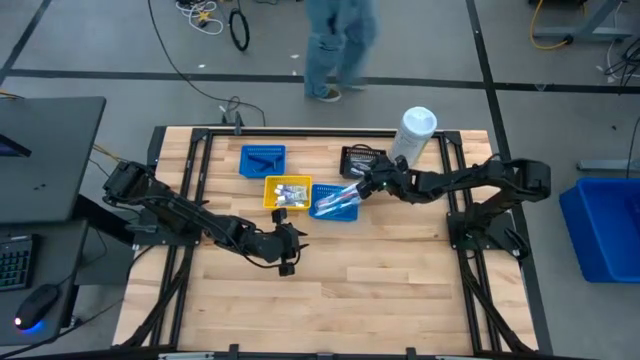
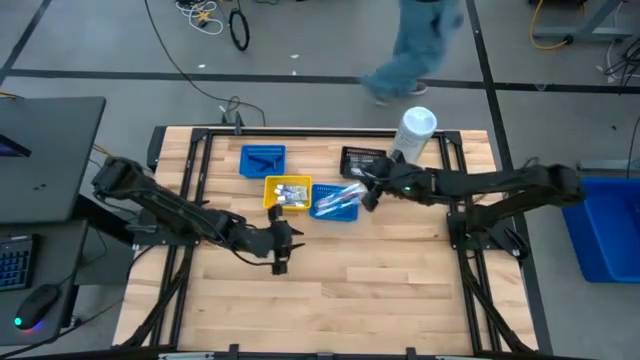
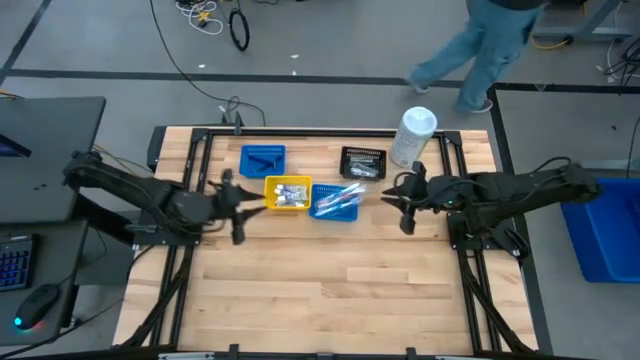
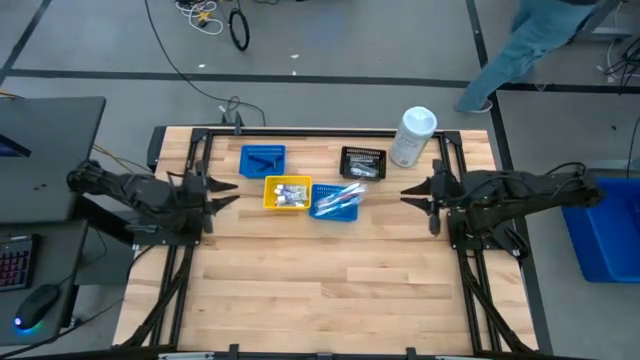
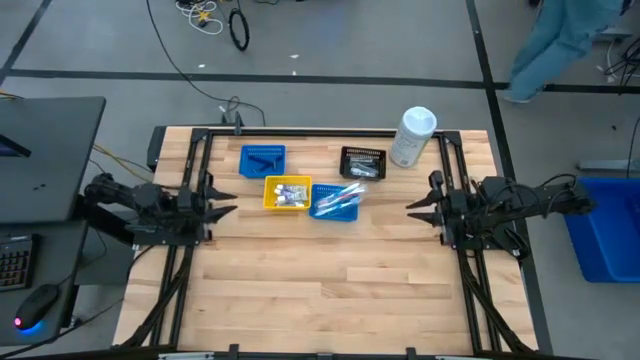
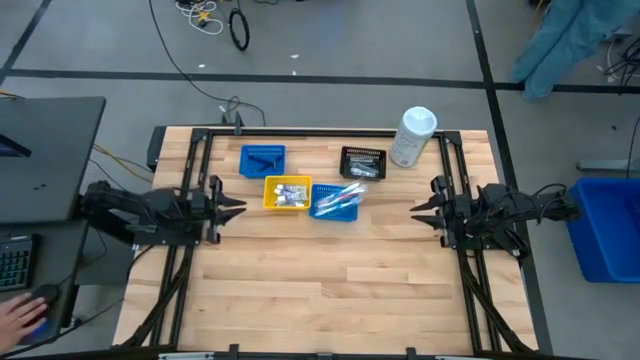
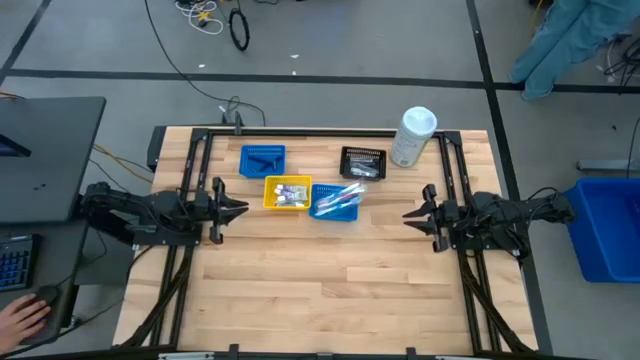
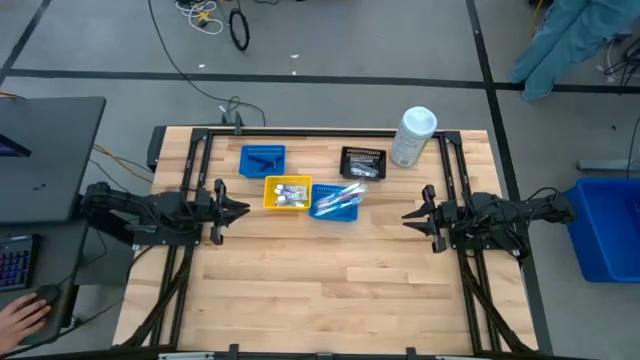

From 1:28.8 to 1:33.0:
Task: Pick & Place Travel size toiletries
Return to Home Position

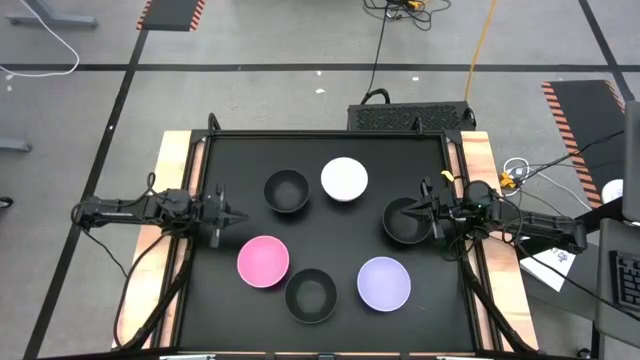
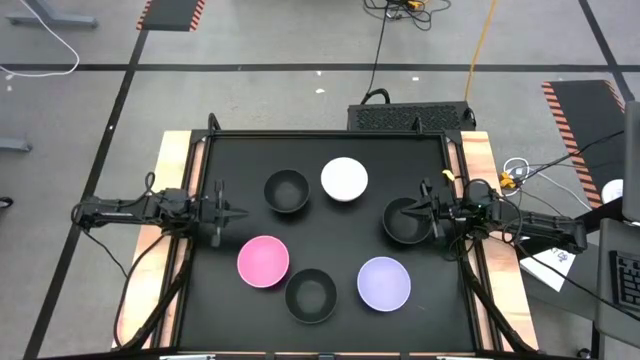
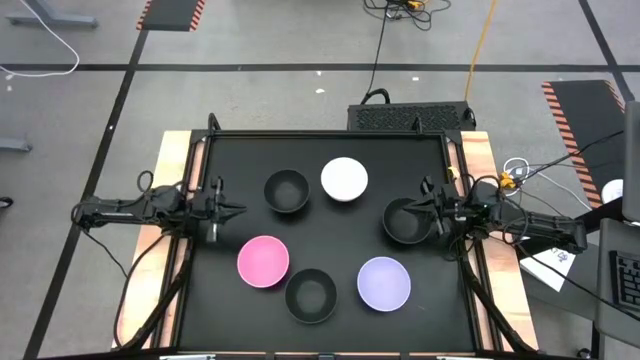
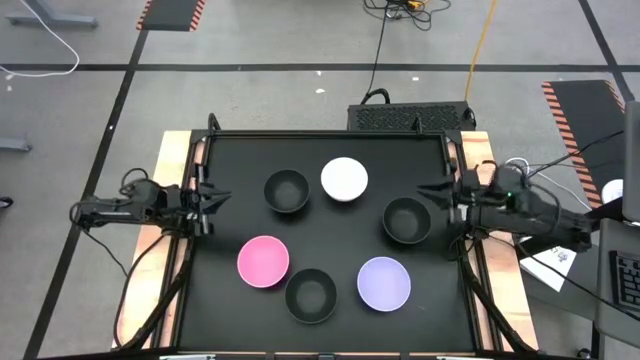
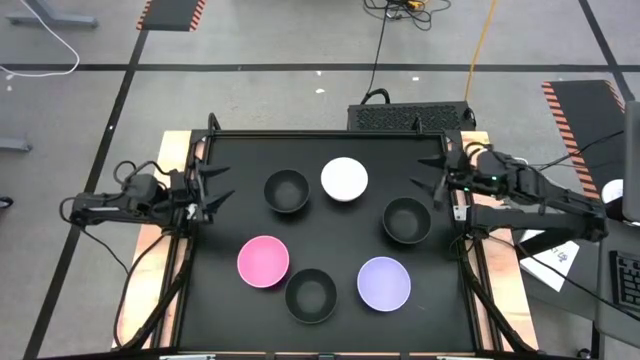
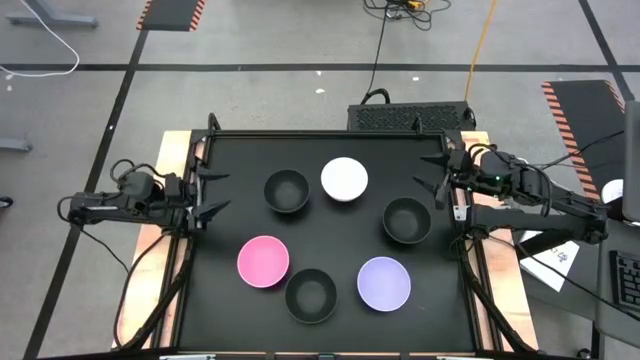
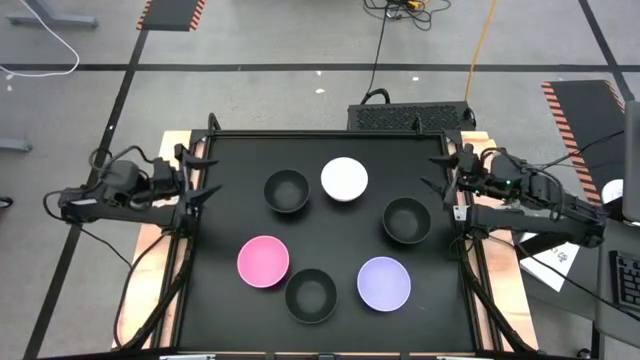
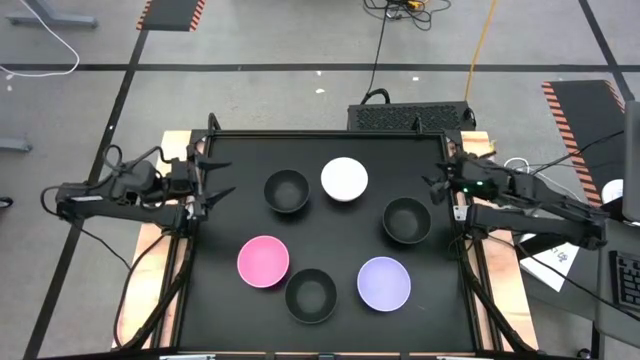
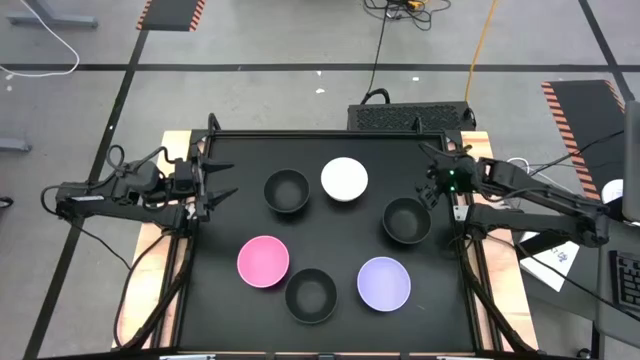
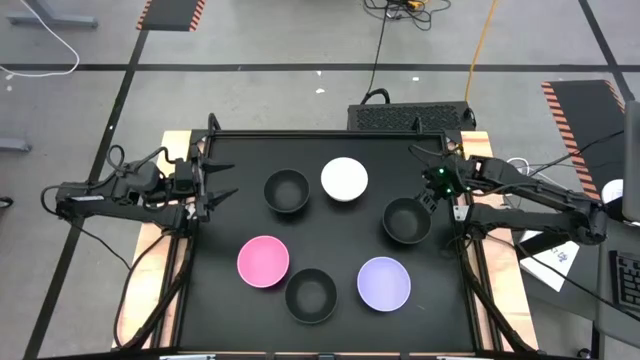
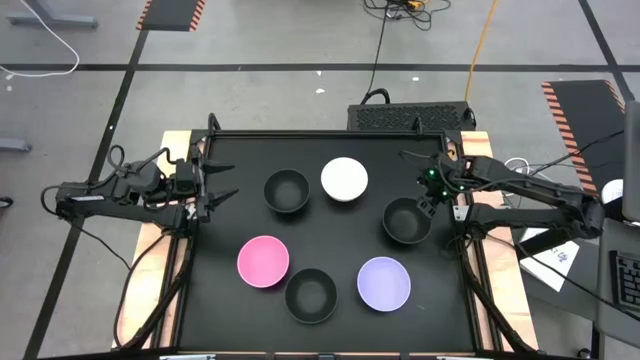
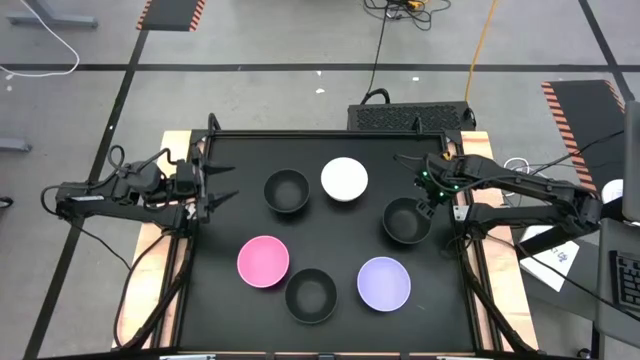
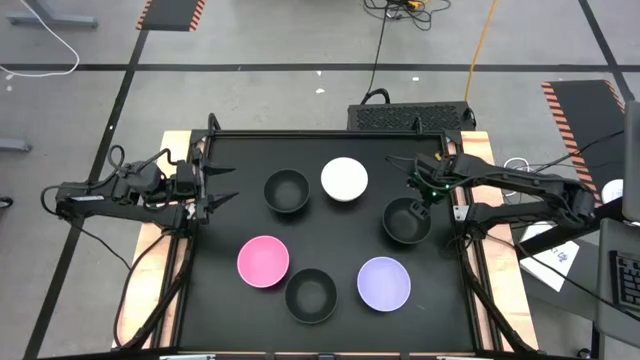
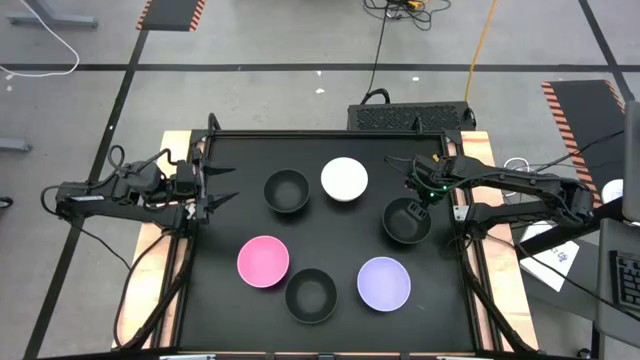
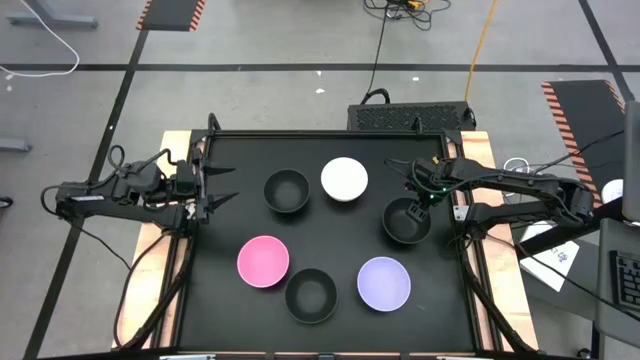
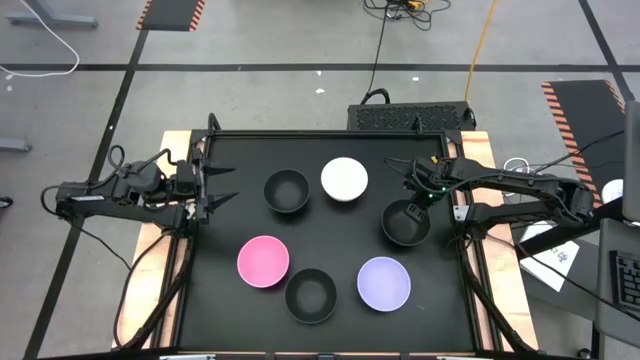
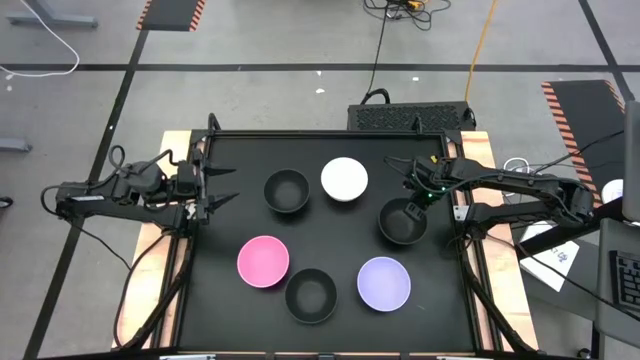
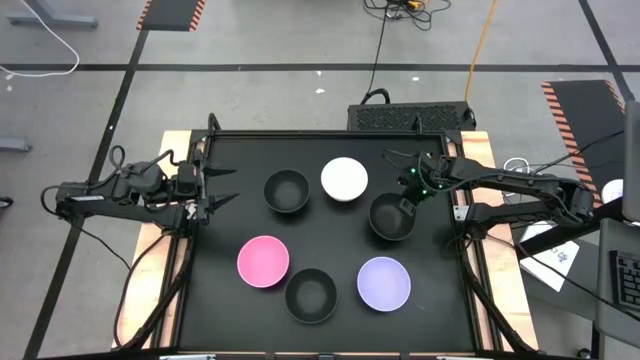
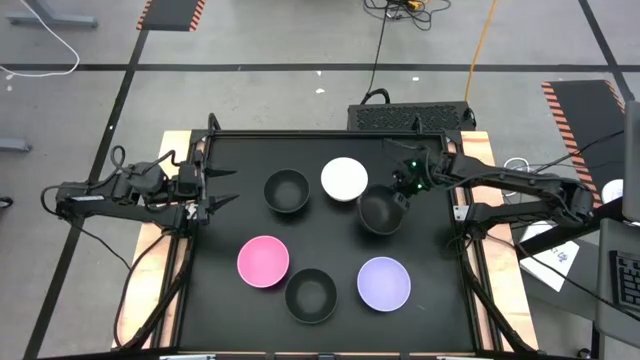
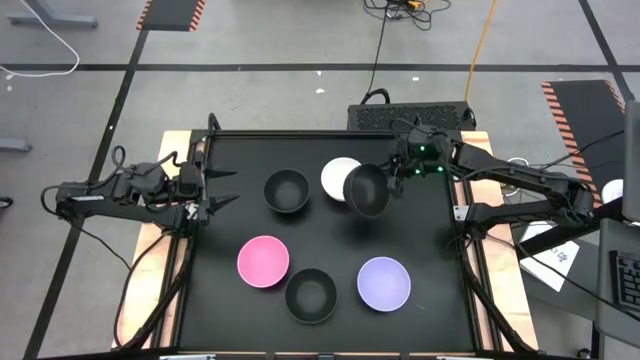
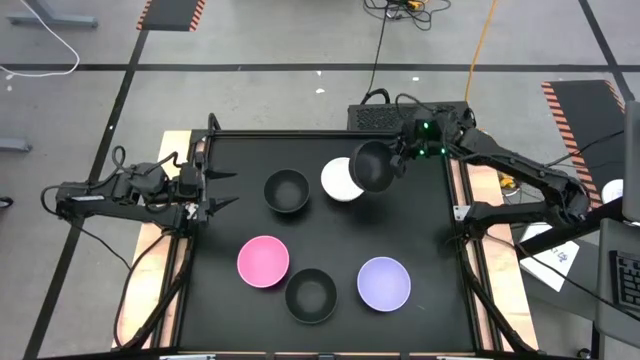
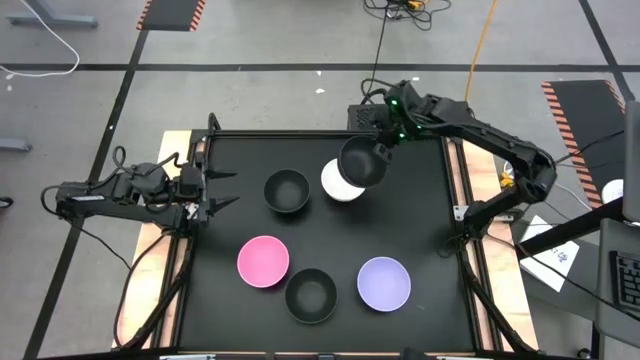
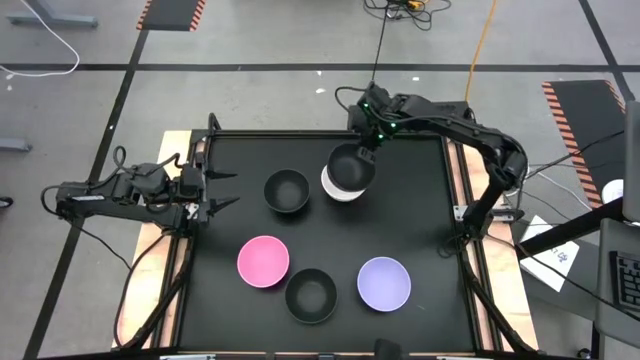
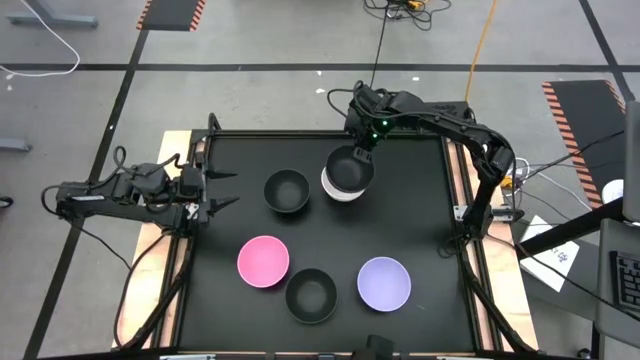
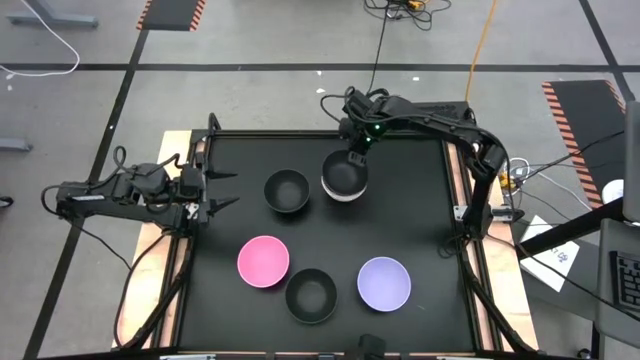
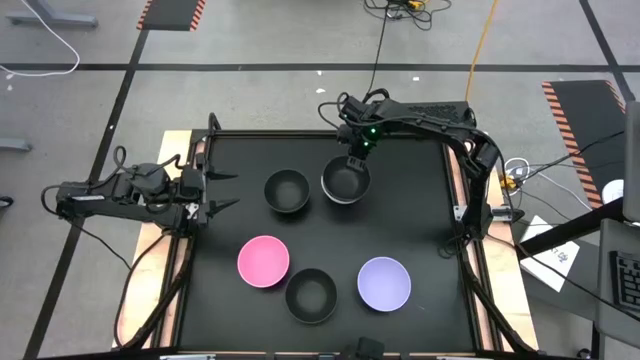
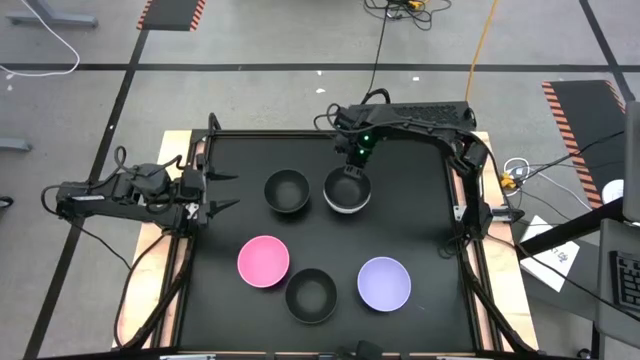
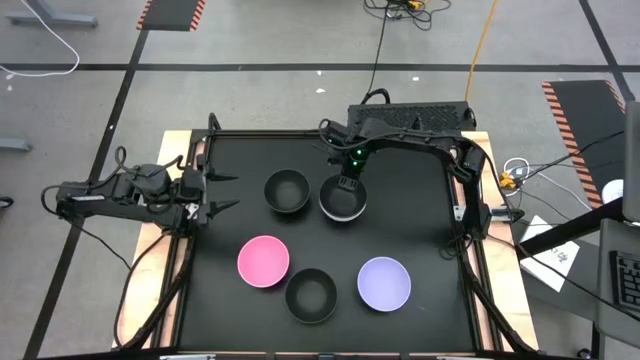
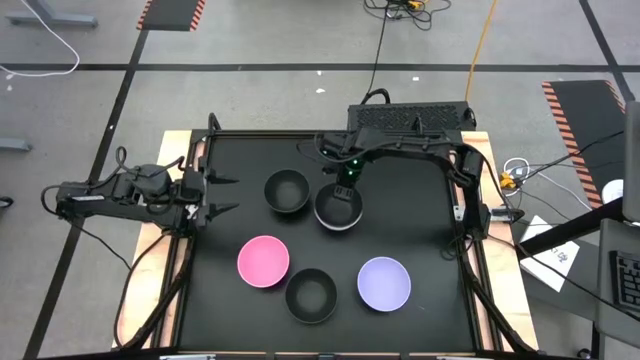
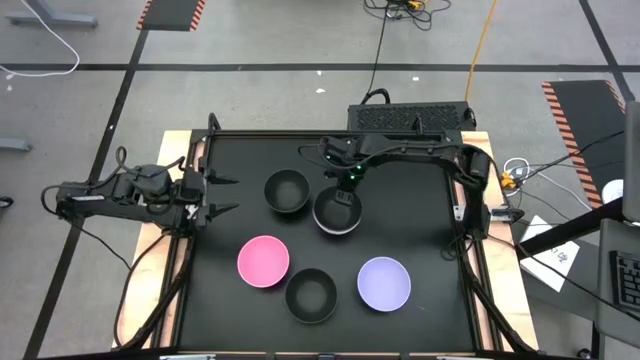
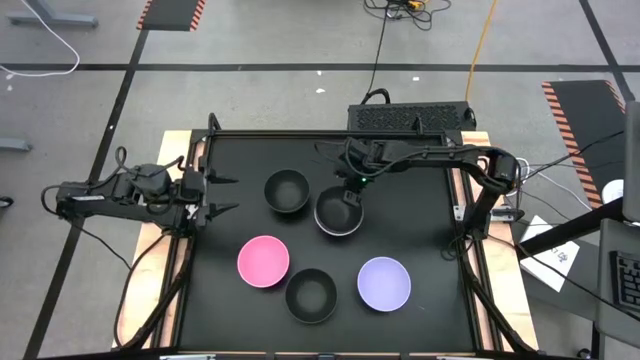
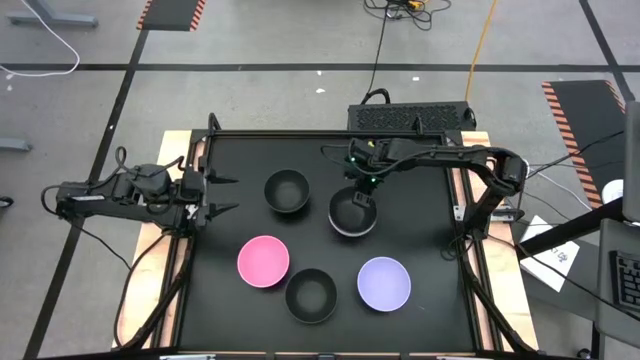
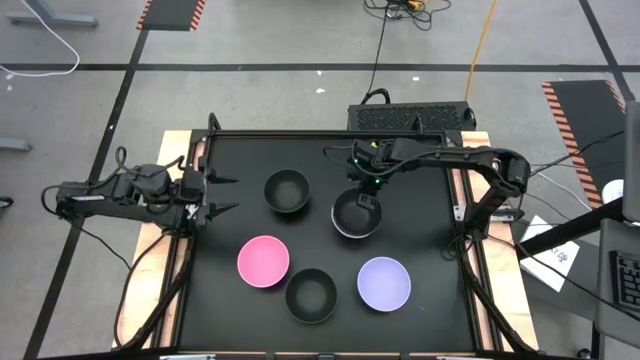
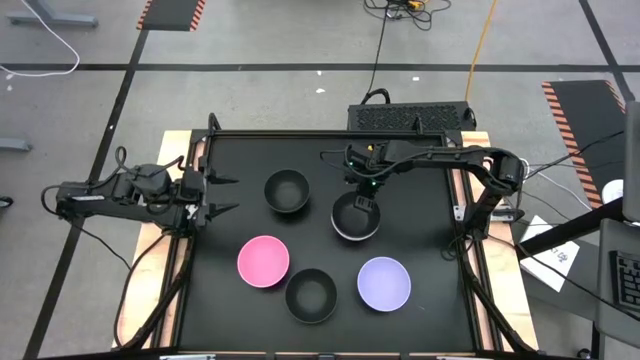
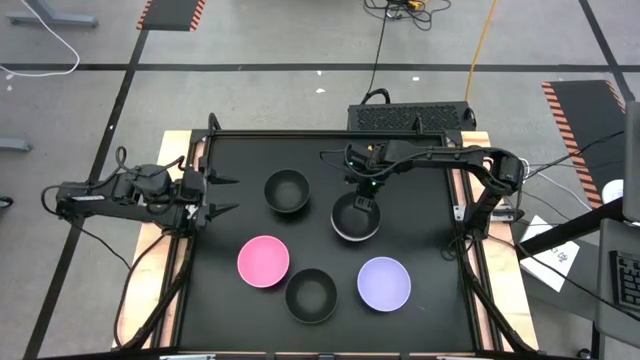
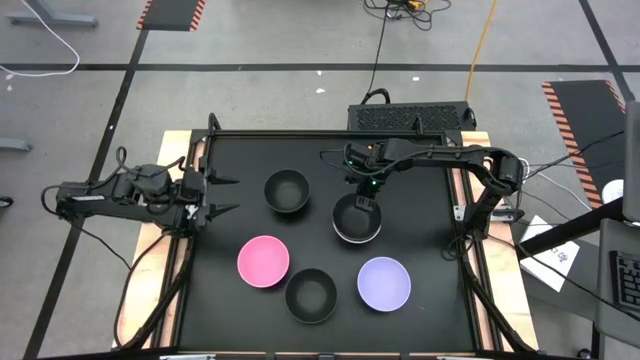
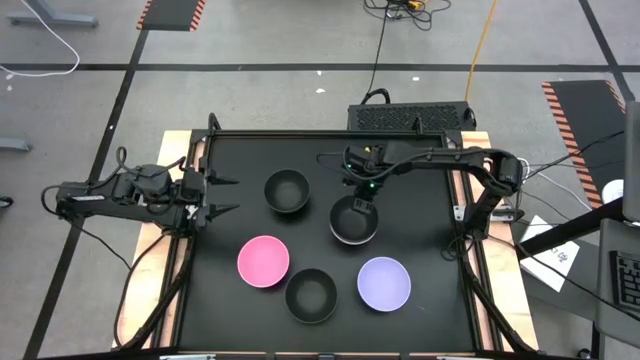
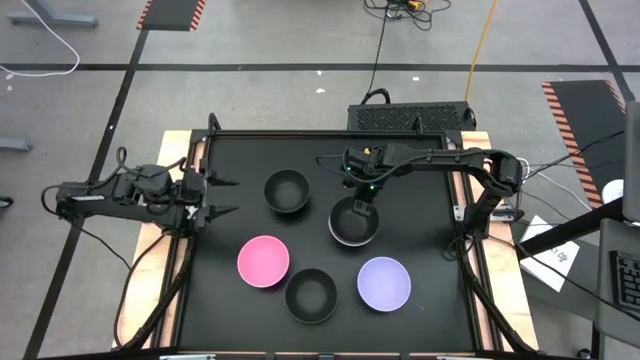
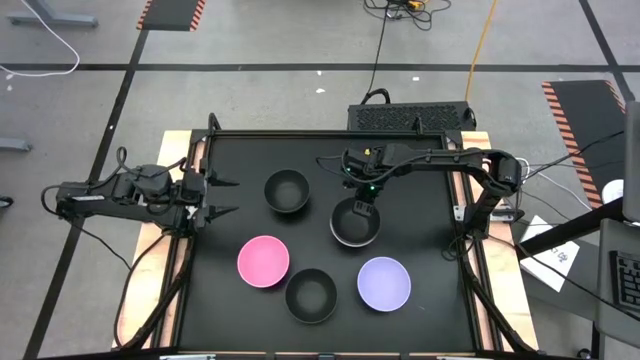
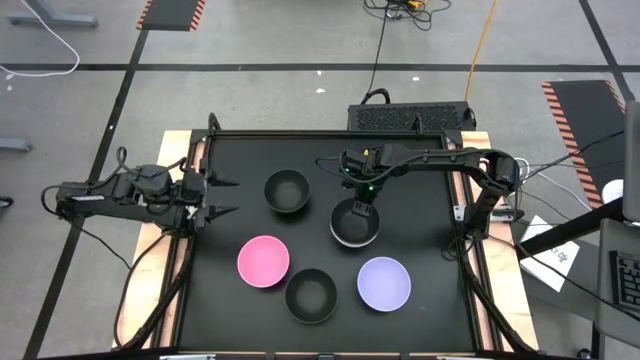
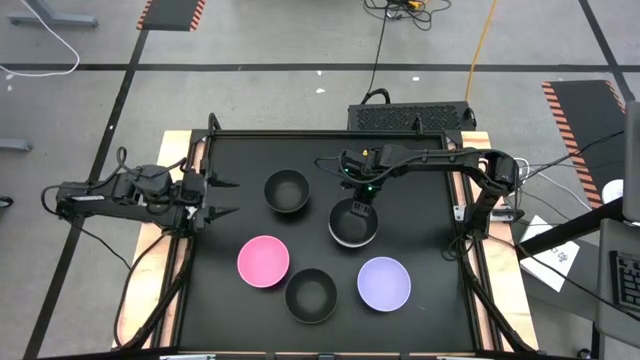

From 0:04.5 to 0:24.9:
Task: Nest bowls inside each other
Stack the middle black bowl on top of the white bowl
